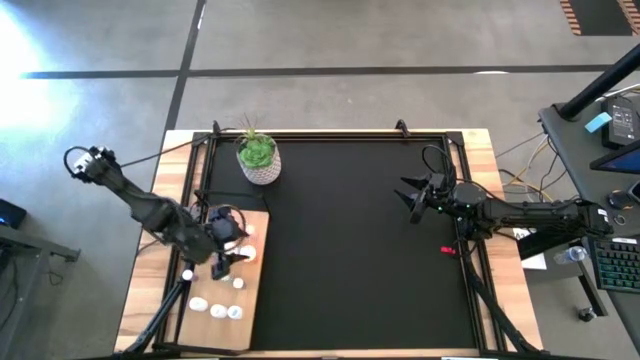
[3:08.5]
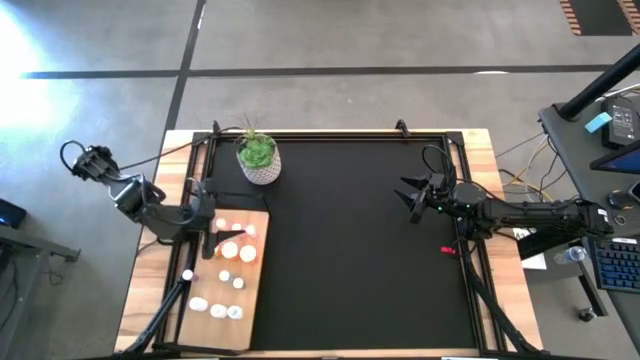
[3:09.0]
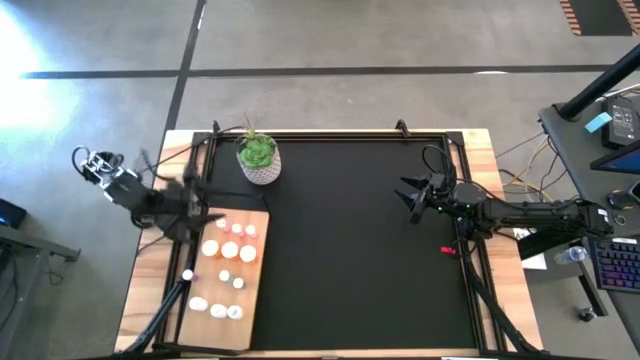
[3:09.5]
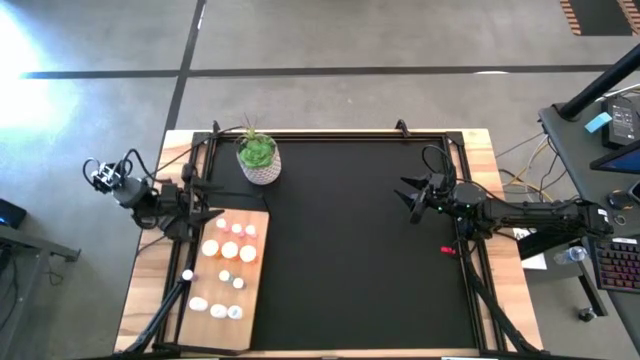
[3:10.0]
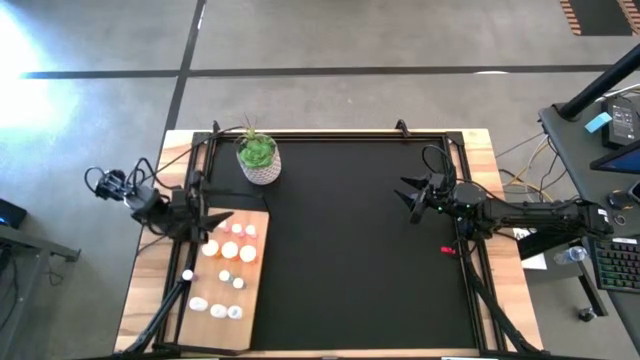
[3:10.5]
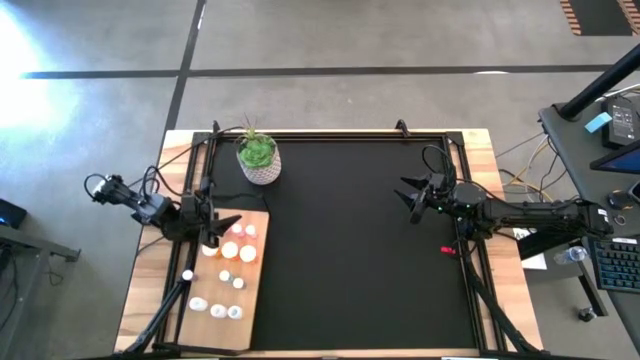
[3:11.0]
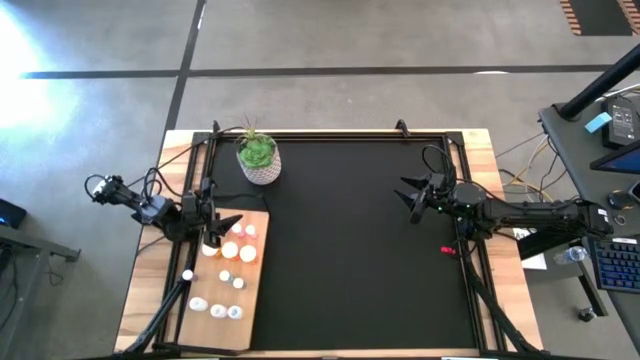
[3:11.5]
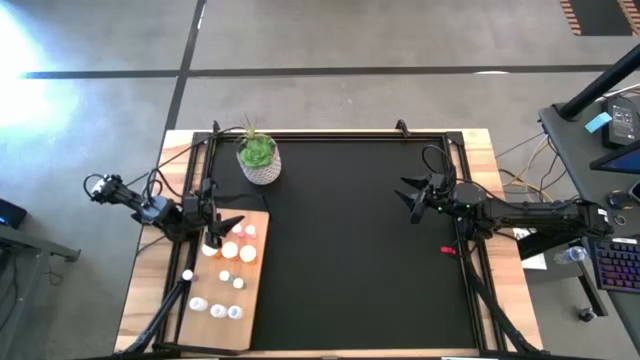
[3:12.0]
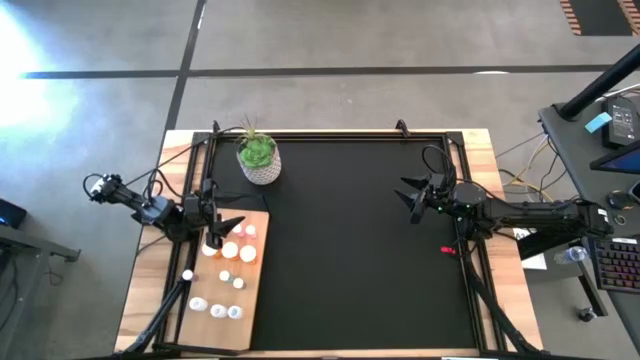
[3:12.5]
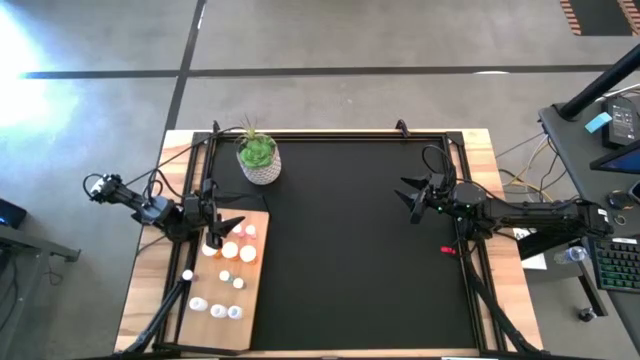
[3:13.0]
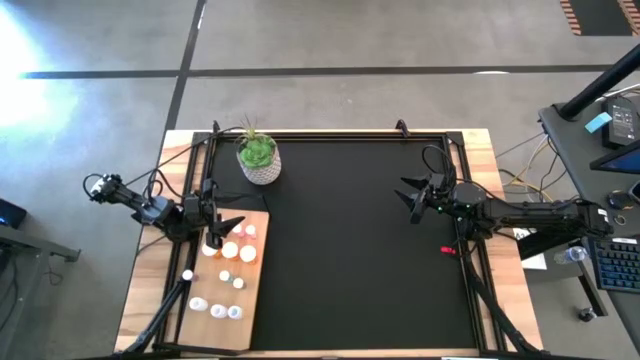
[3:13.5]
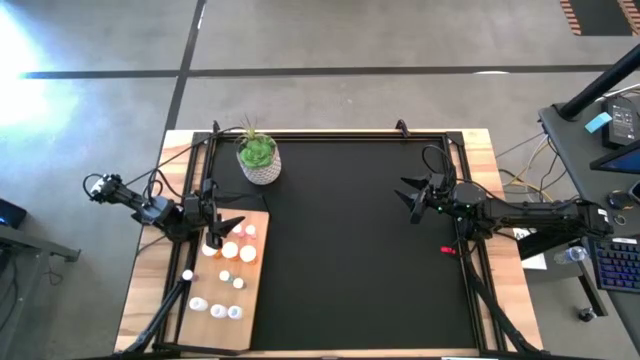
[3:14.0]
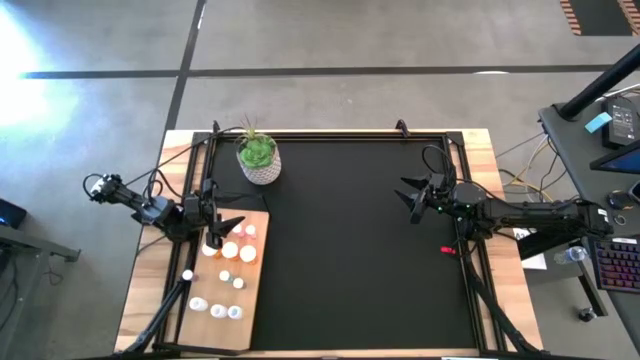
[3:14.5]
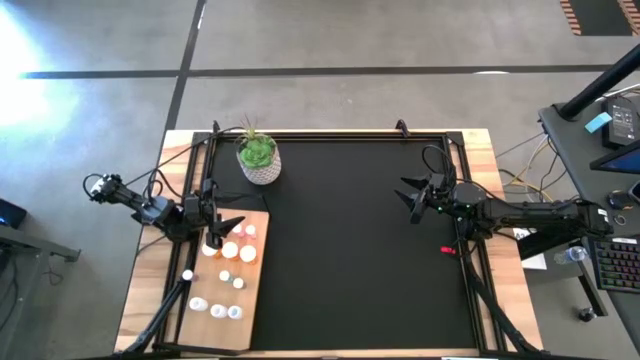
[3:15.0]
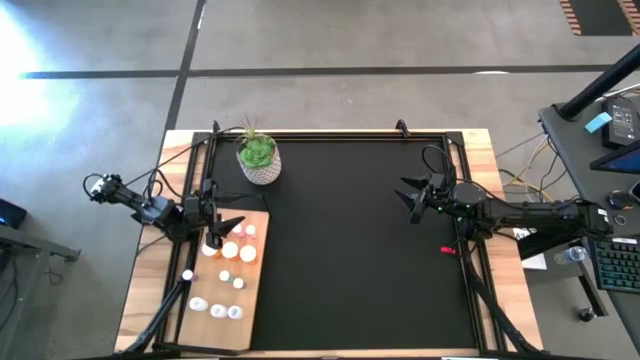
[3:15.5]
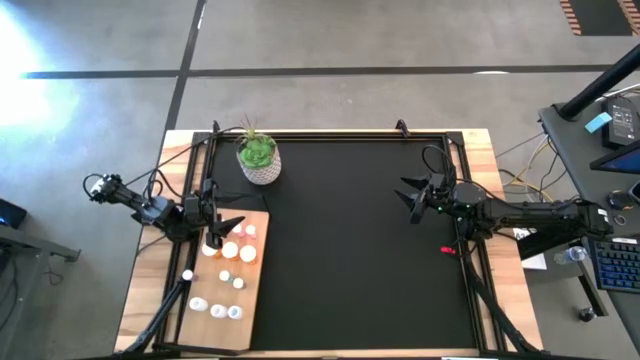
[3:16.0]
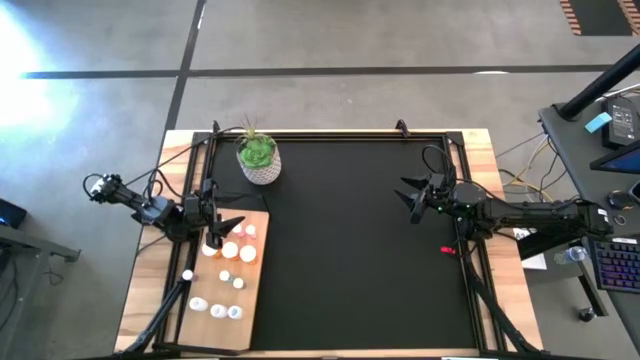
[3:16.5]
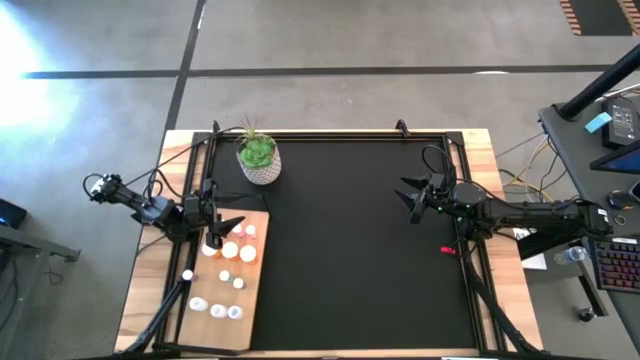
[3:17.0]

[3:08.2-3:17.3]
Task: Pick and place medicine bottles onto shelf by color
Return to Home Position

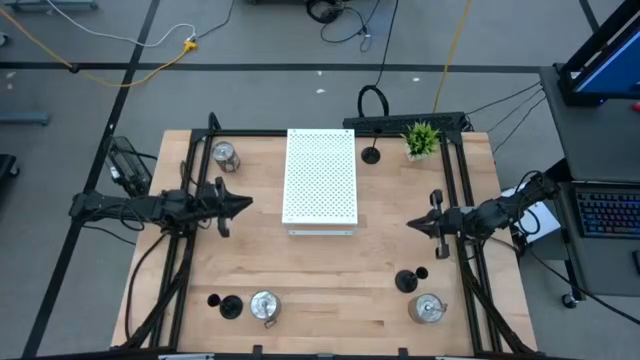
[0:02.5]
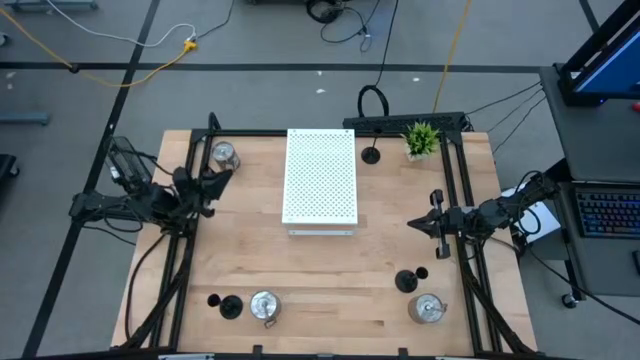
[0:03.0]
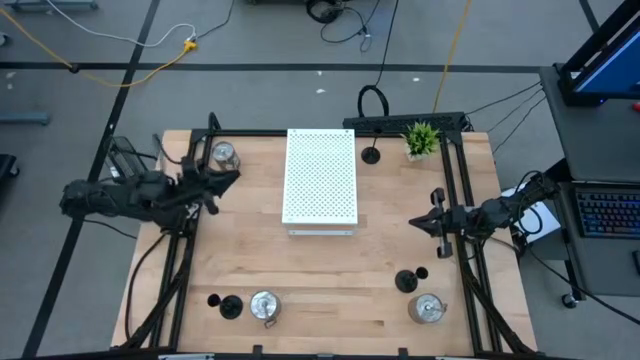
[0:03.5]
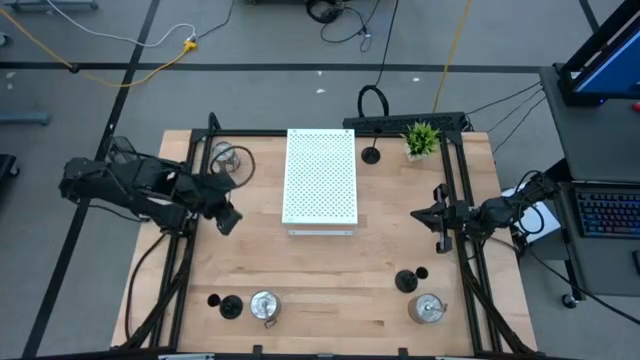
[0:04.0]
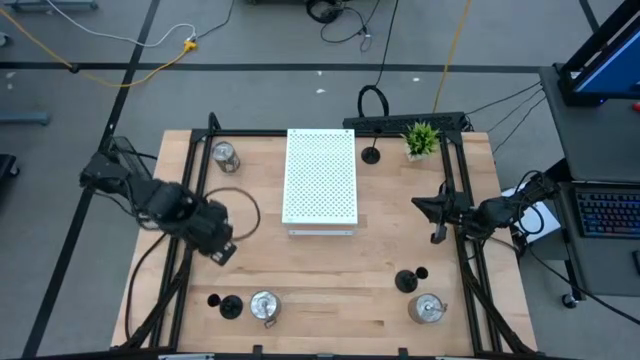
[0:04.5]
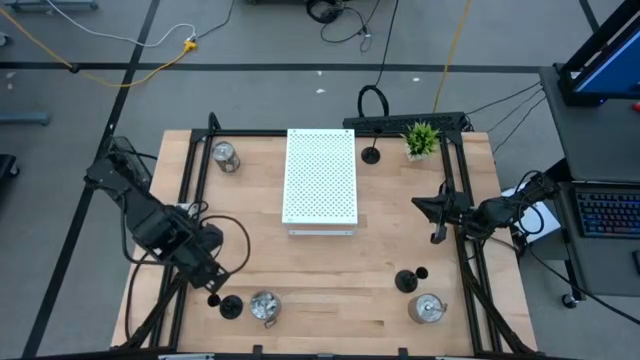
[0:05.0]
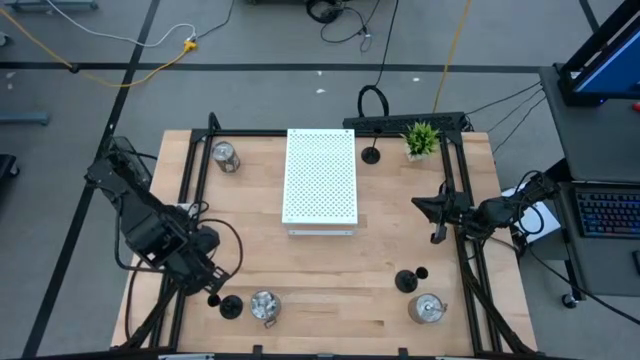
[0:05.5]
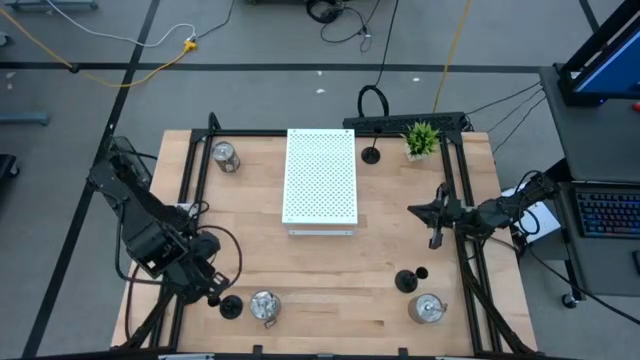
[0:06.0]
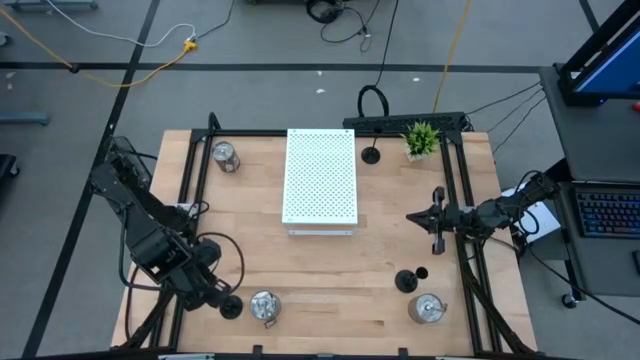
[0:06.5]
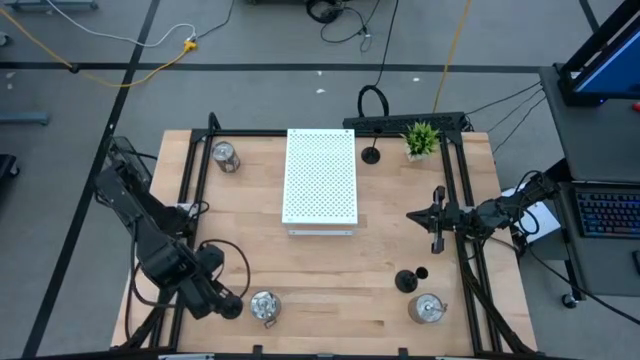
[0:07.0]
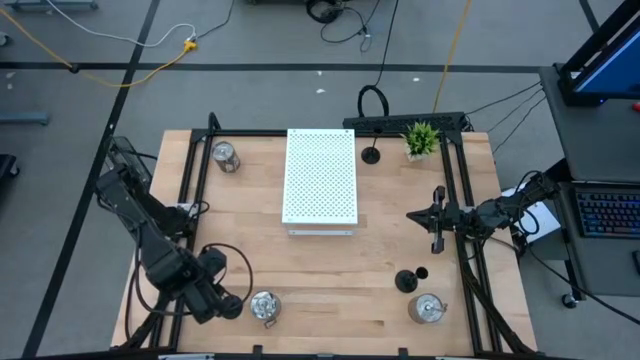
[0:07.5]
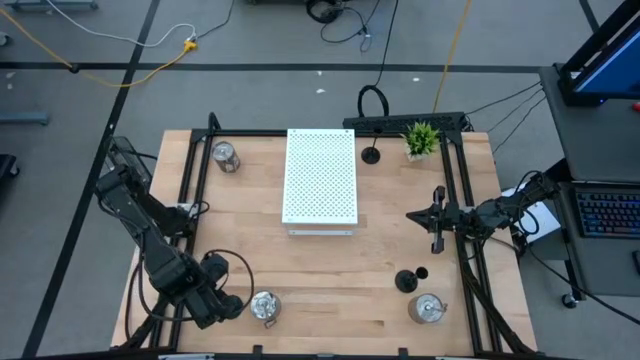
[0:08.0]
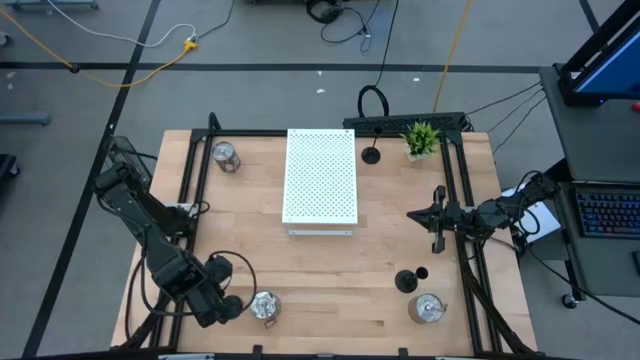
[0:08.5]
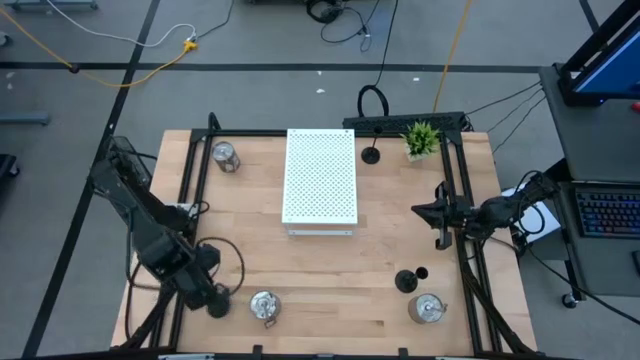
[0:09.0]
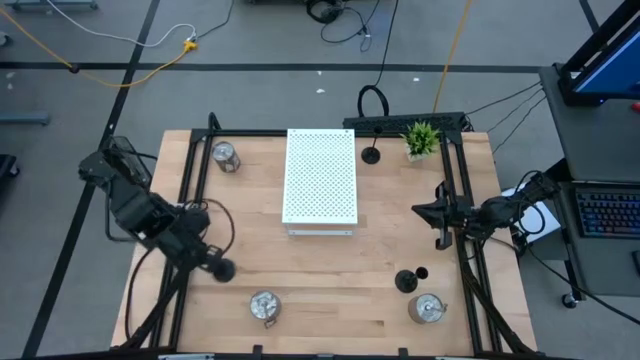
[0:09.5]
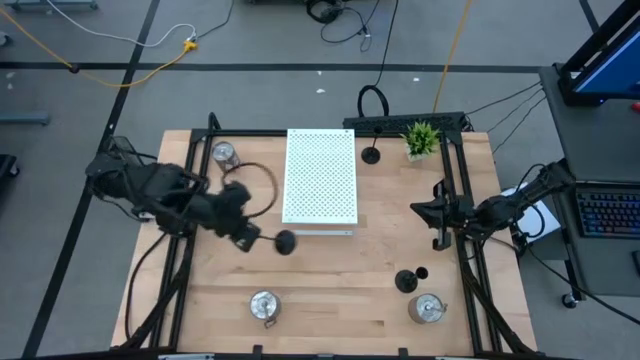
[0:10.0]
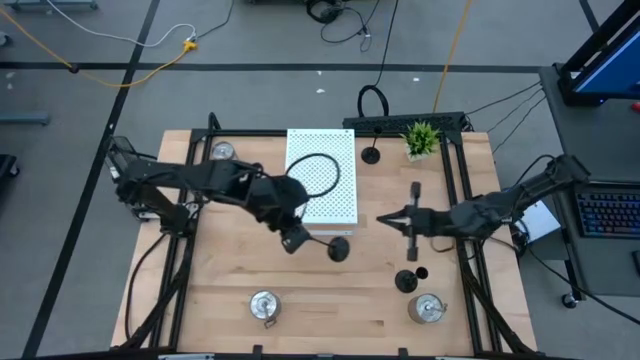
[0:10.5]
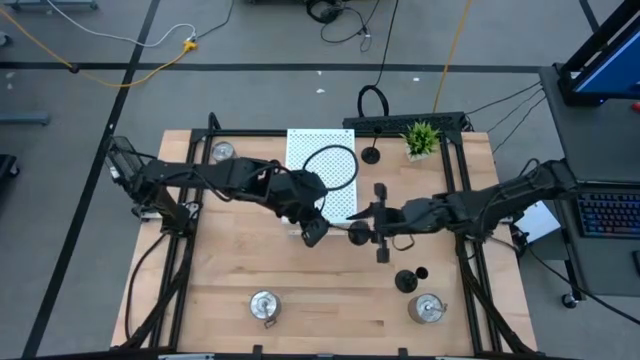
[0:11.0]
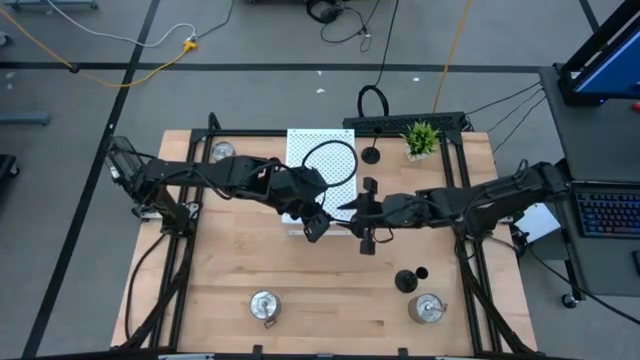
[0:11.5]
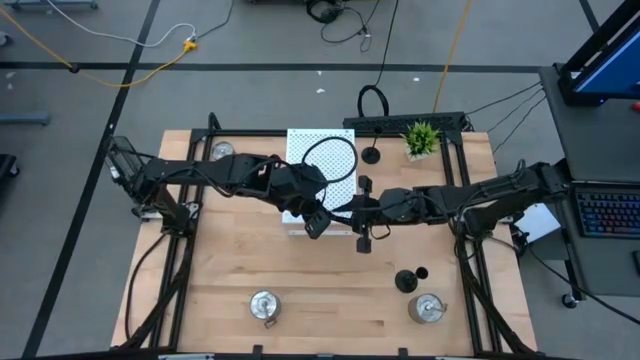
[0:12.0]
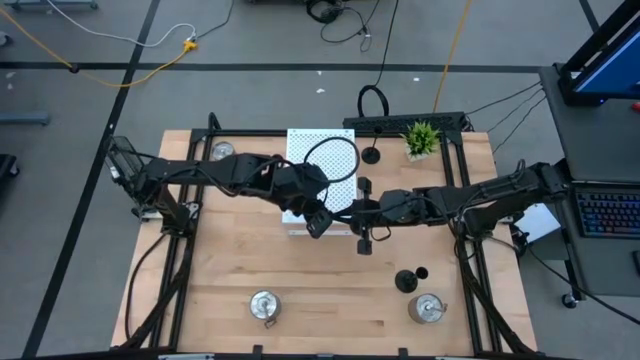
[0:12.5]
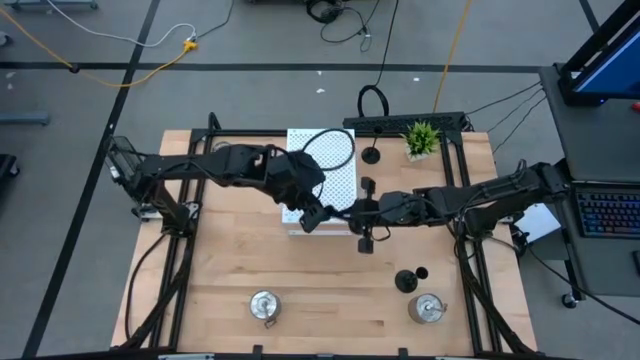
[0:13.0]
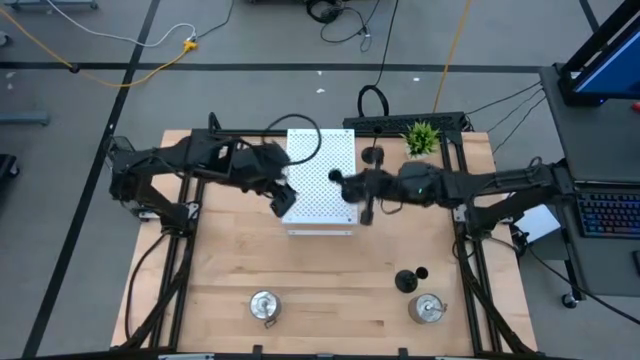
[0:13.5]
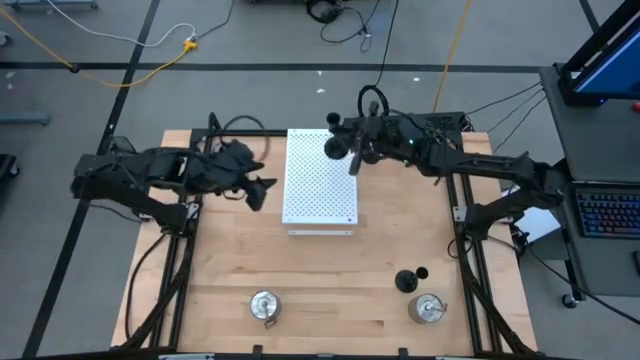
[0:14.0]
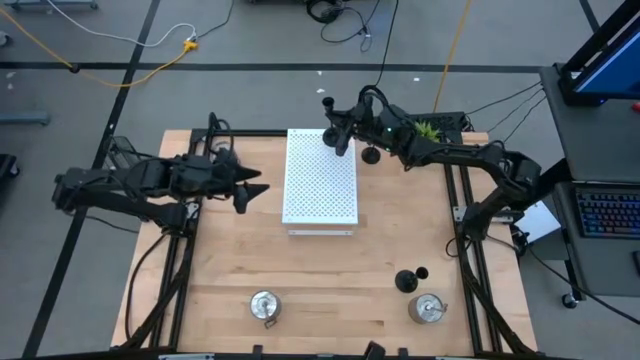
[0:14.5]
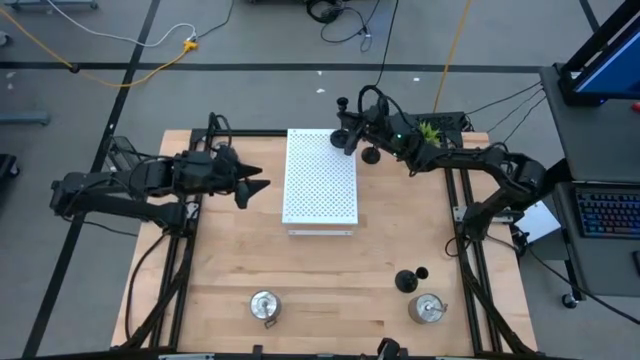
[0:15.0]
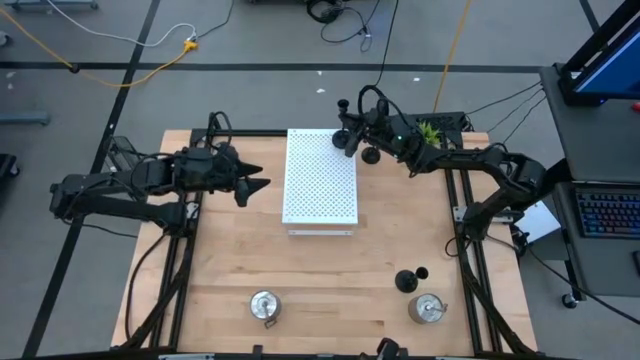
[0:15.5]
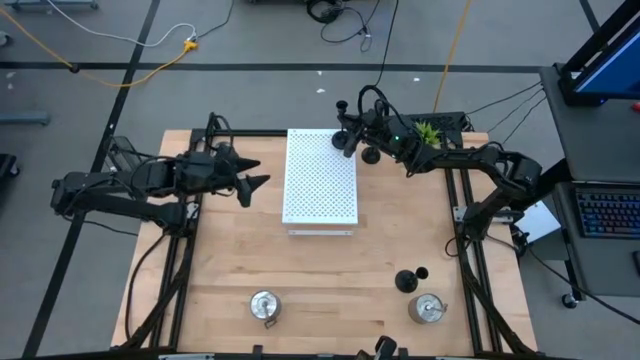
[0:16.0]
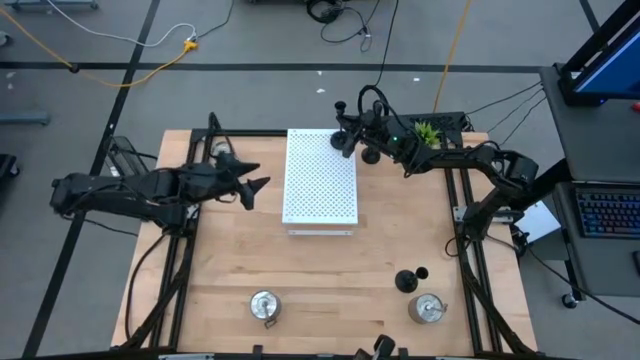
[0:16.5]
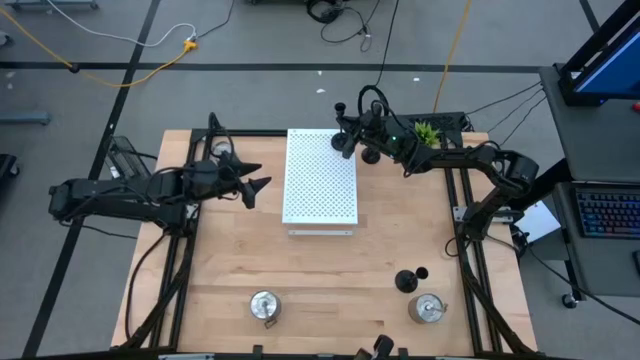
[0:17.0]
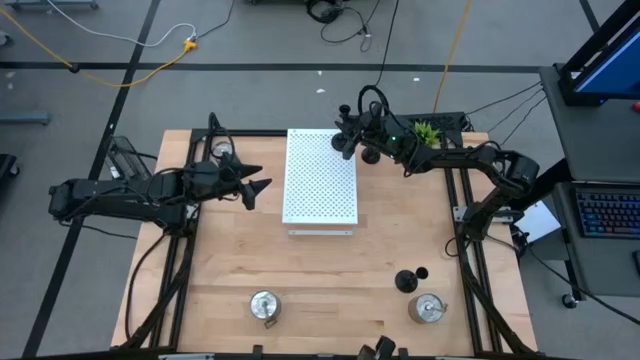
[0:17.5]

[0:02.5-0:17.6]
Task: Pick & Place candle stick holders
Put the bottom left black candle holder on the shelf
